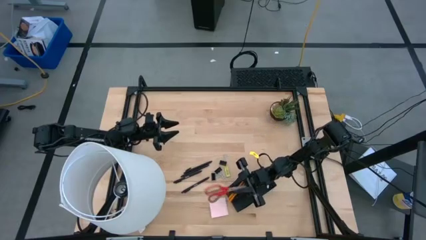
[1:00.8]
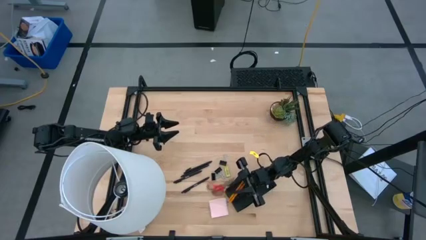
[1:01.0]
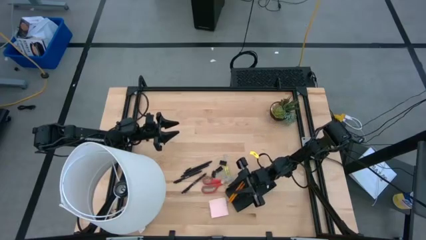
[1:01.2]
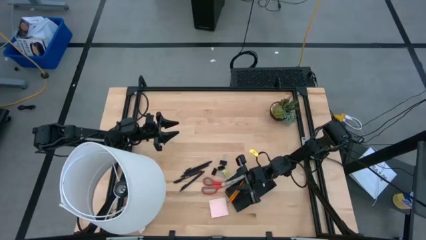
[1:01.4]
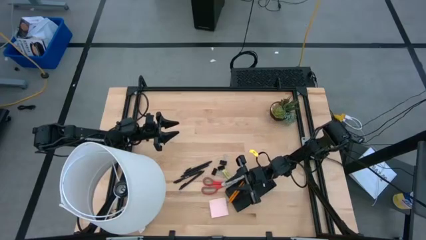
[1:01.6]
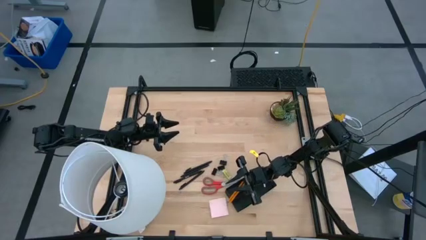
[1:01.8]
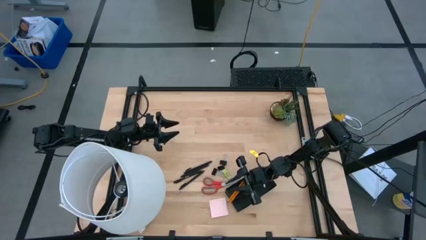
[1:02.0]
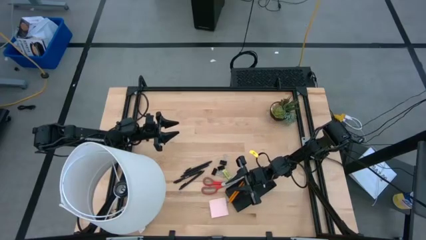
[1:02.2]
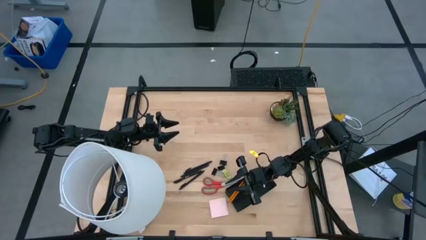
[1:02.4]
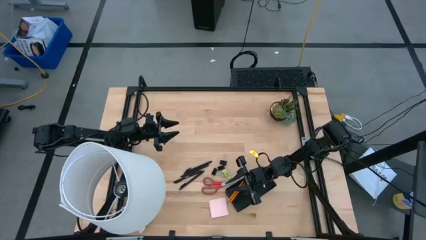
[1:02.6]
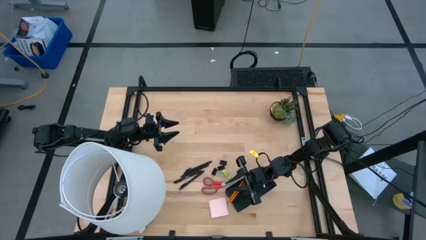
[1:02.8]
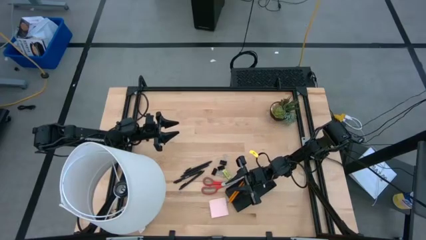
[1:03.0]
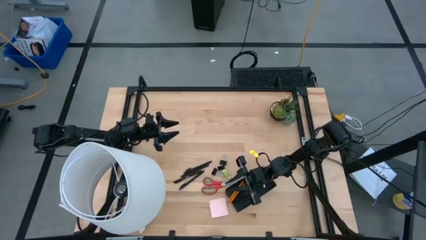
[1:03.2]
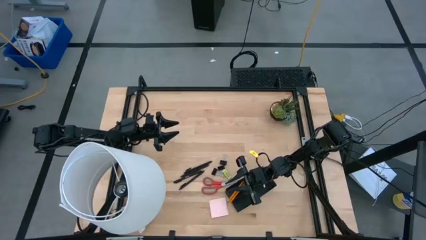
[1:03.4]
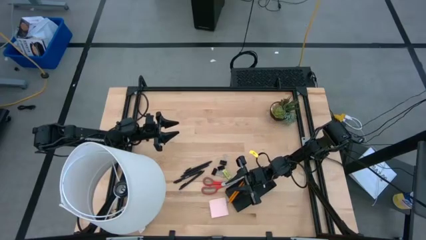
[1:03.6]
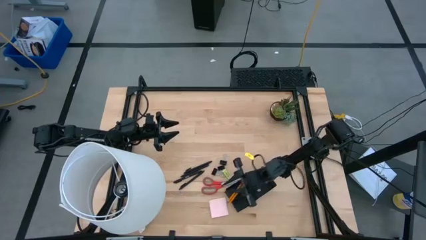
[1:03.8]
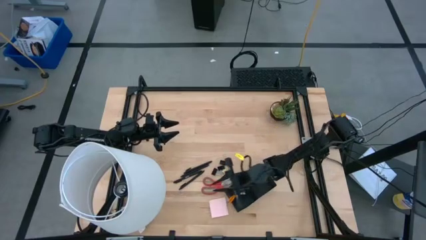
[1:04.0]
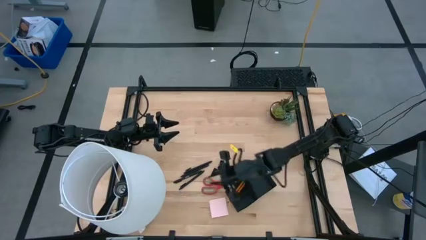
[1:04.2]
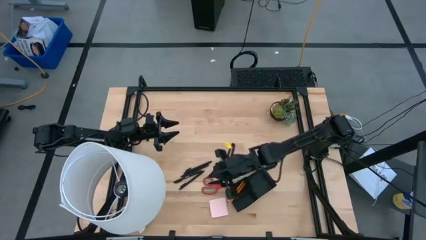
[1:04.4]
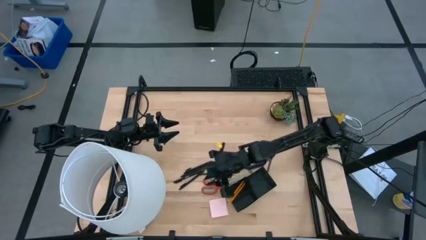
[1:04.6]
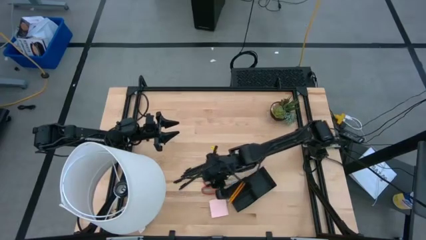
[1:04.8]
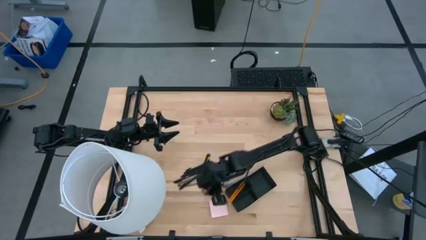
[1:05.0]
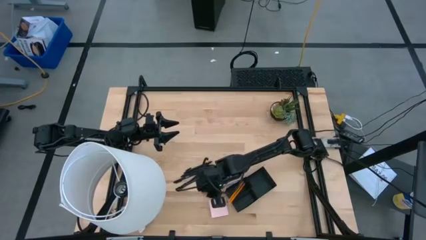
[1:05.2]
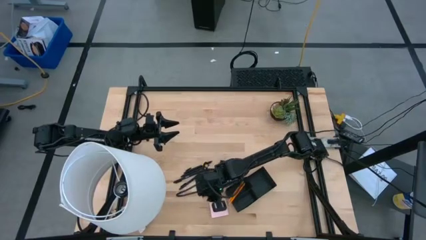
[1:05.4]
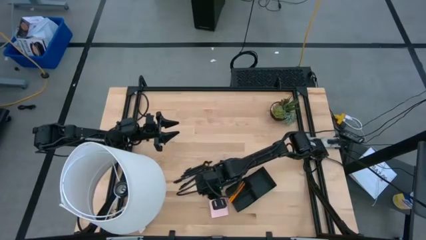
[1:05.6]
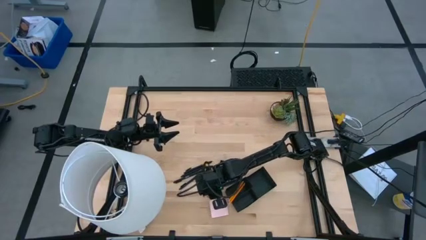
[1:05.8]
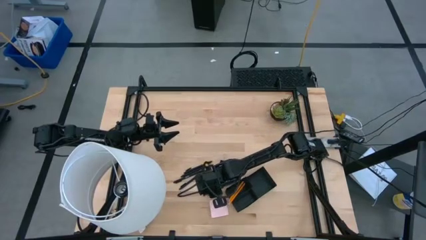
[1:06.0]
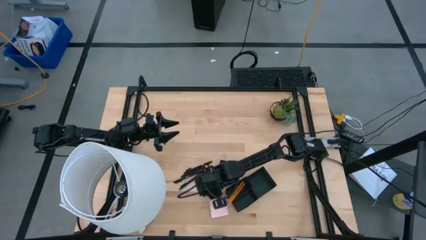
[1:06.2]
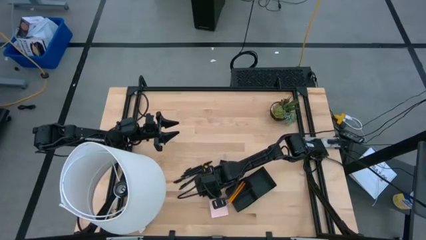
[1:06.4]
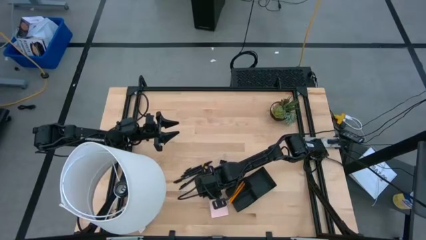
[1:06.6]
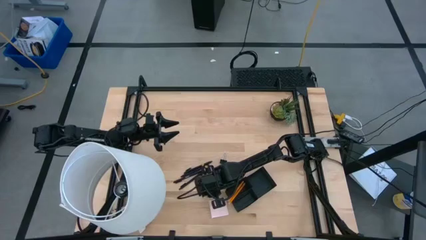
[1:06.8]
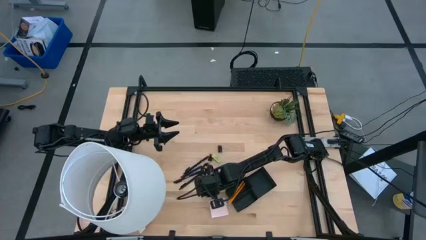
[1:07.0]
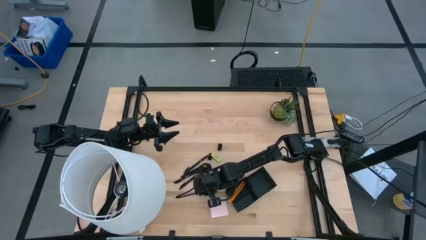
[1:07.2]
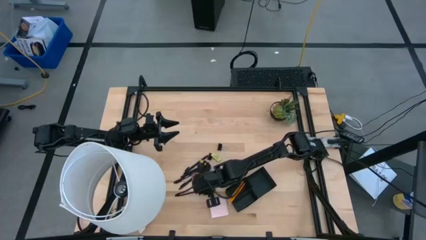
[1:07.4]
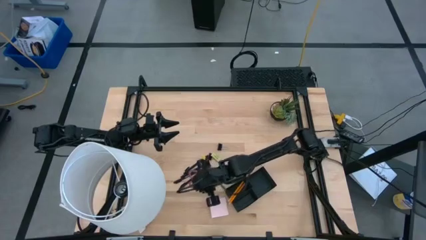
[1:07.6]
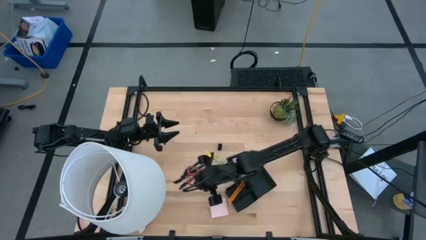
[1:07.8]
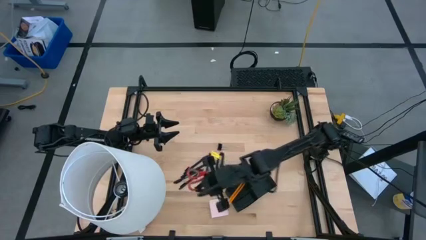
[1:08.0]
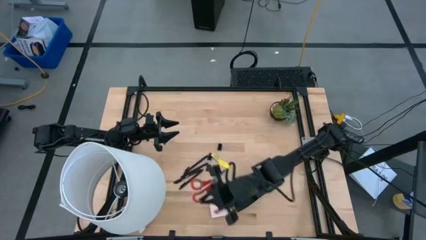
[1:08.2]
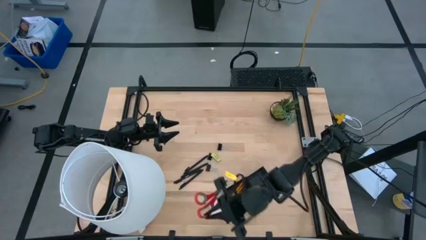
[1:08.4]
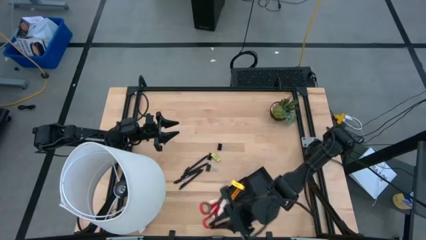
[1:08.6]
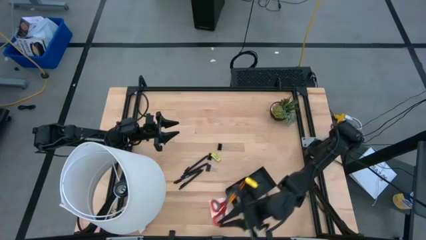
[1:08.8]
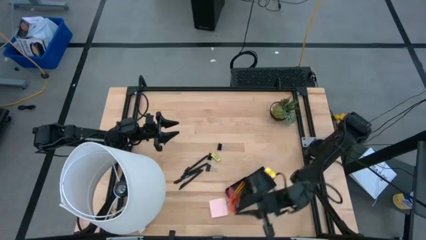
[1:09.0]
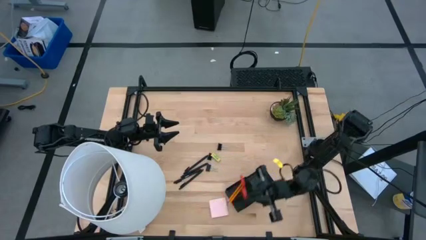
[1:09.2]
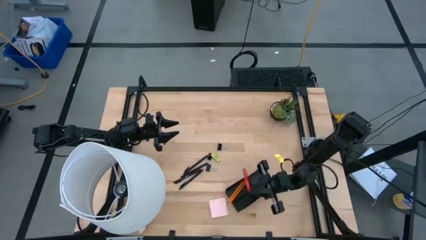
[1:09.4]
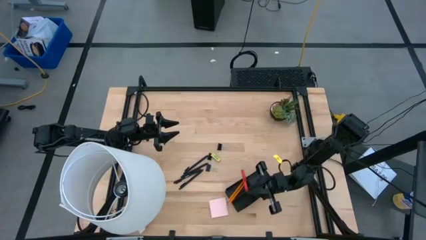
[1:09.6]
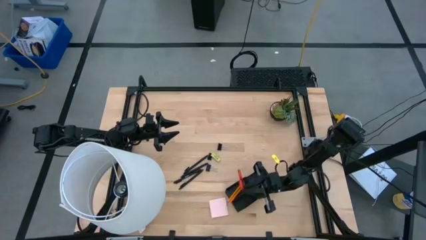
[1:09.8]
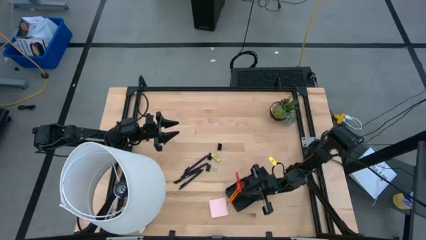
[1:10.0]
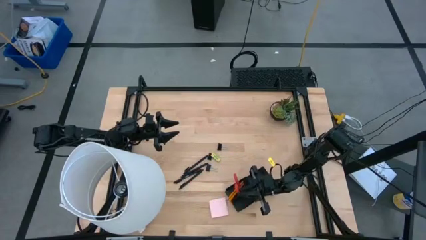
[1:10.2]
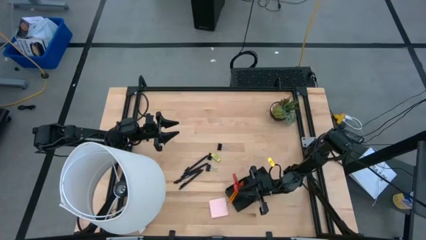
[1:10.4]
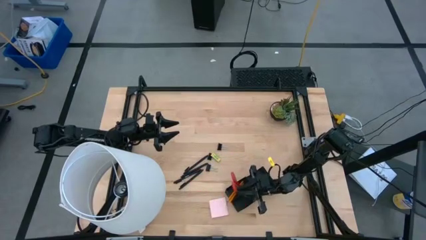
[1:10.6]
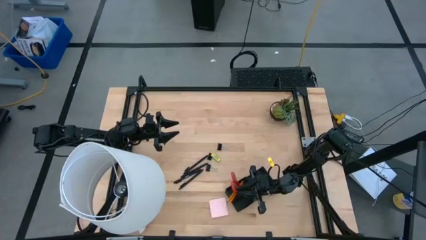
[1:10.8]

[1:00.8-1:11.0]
Task: Pick and place office supplies into organizer
Put the red scissors into the black desk organizer

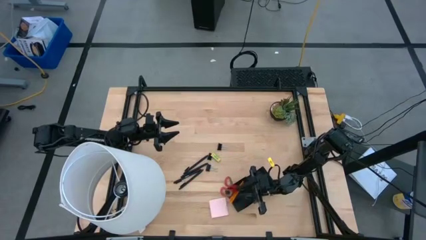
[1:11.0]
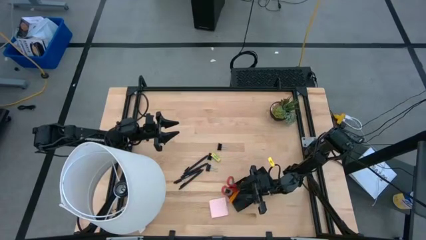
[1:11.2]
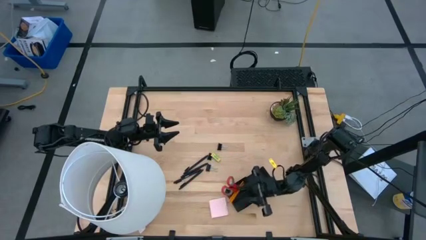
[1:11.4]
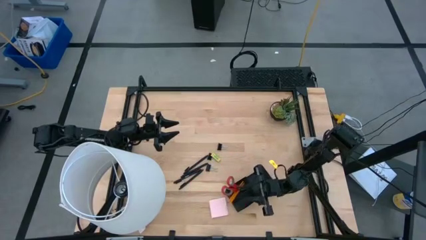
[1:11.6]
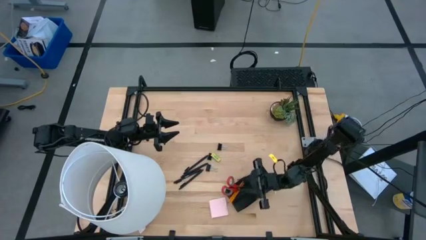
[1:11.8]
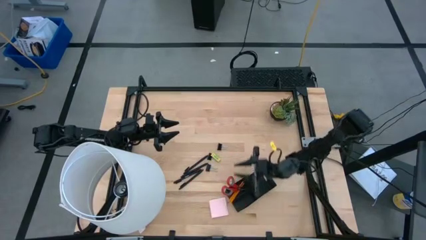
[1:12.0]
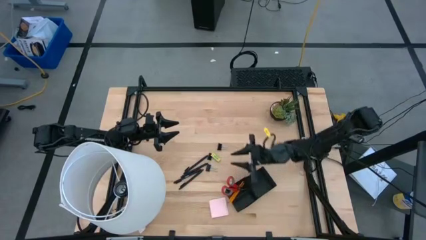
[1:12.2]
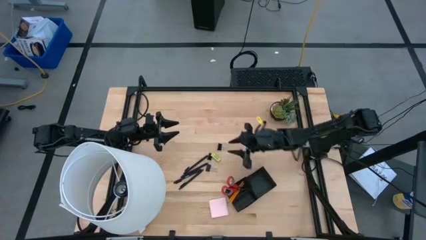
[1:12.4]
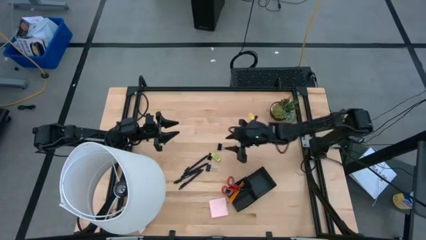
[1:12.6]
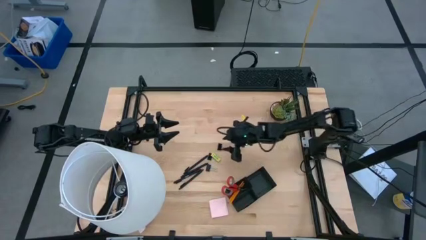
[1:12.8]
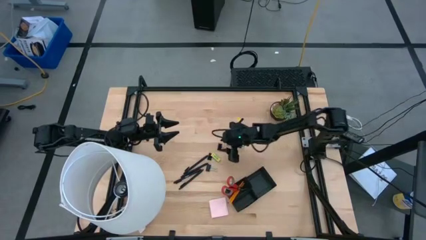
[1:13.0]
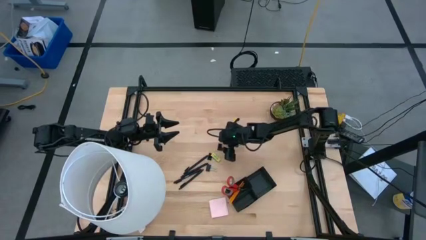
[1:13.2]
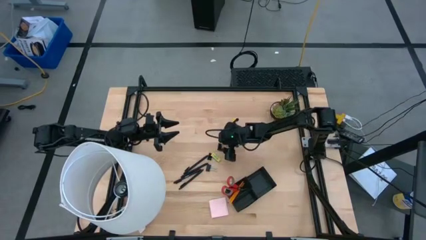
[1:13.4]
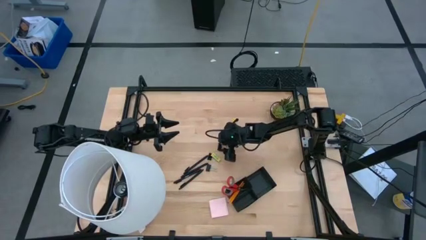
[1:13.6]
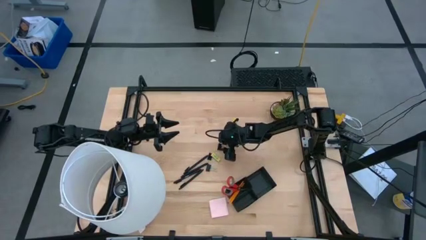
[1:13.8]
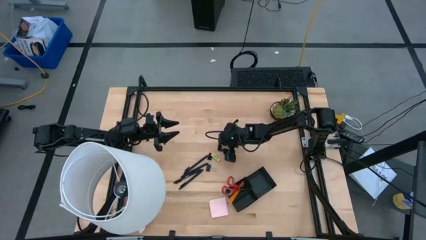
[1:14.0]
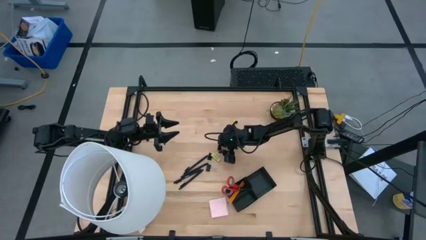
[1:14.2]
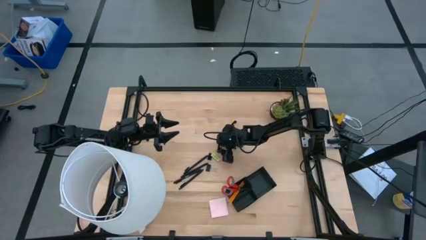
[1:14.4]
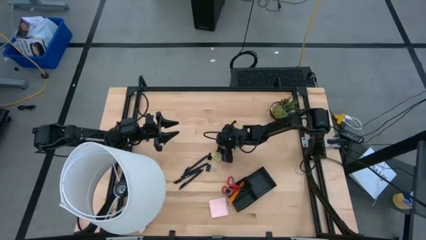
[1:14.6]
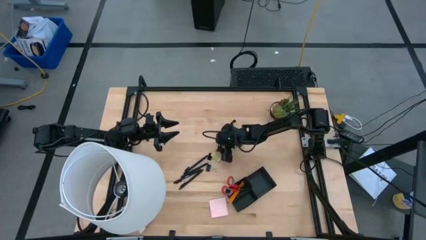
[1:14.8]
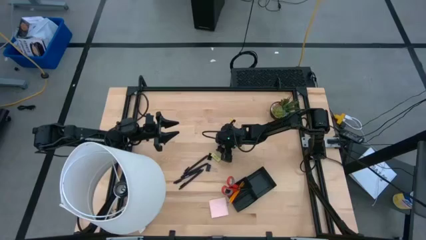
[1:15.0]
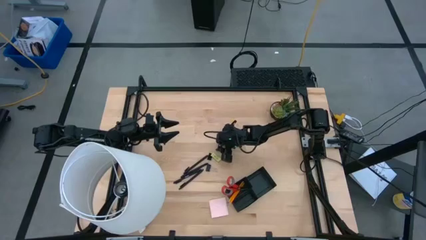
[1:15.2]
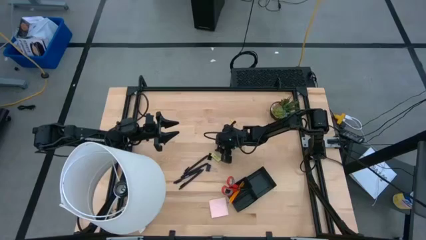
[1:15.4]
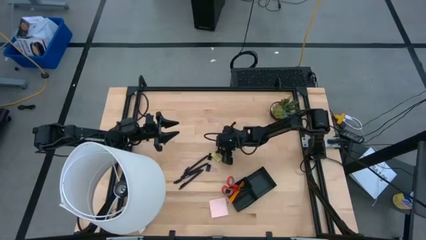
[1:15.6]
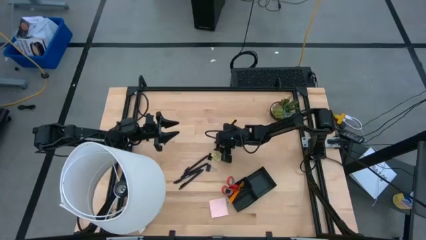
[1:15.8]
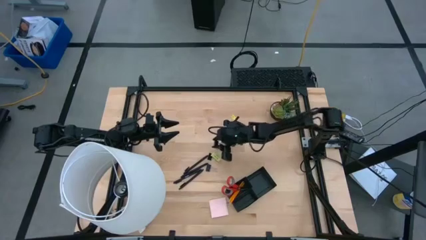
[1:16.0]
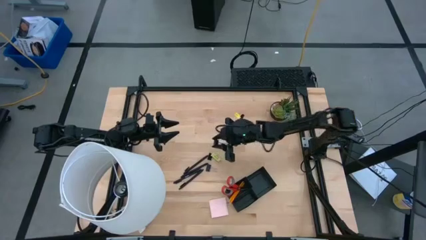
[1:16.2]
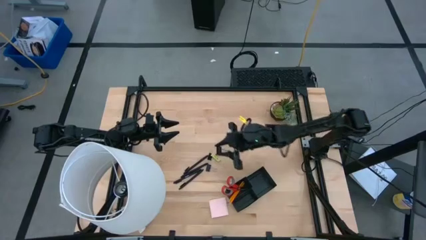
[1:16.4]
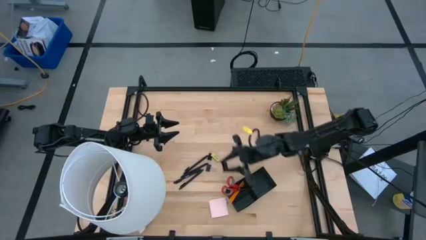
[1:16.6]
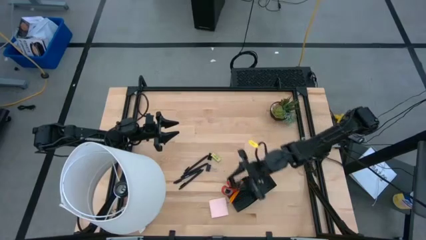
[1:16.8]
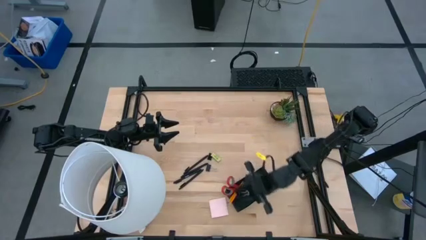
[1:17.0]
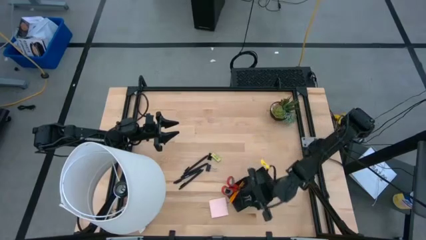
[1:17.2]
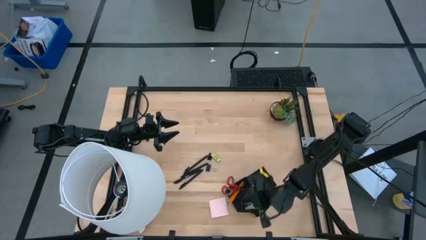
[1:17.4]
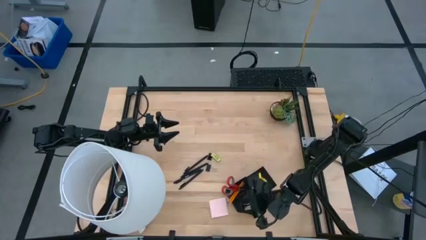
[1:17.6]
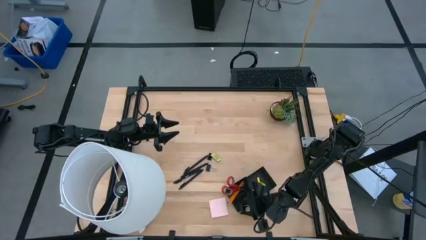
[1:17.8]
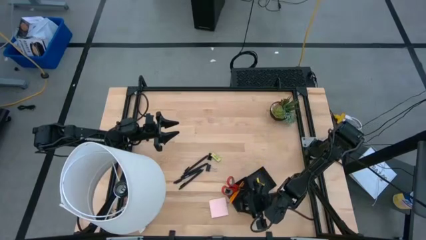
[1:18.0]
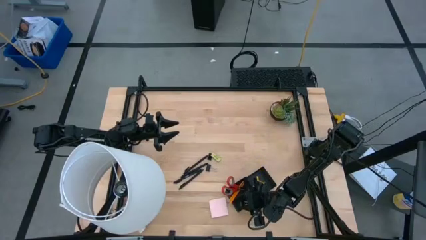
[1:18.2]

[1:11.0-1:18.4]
Put the black binder clip into the black desk organizer
